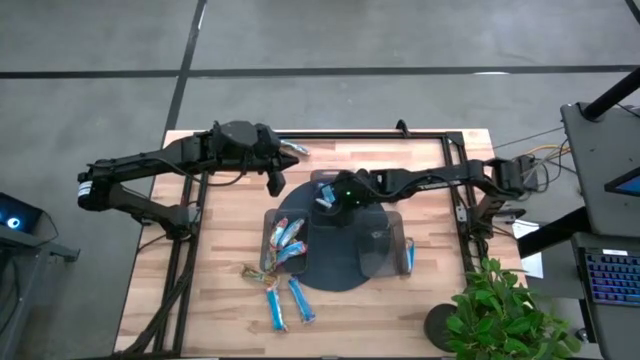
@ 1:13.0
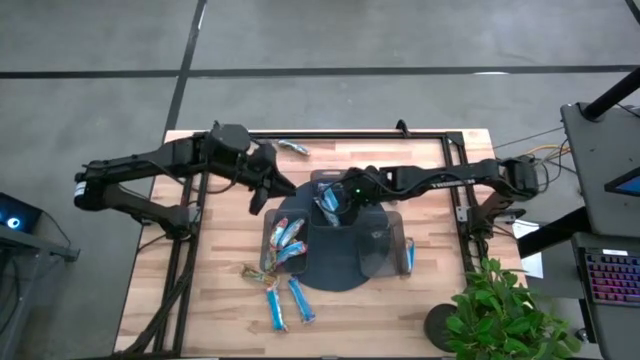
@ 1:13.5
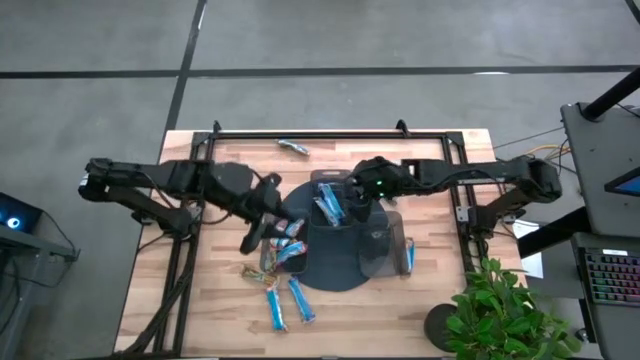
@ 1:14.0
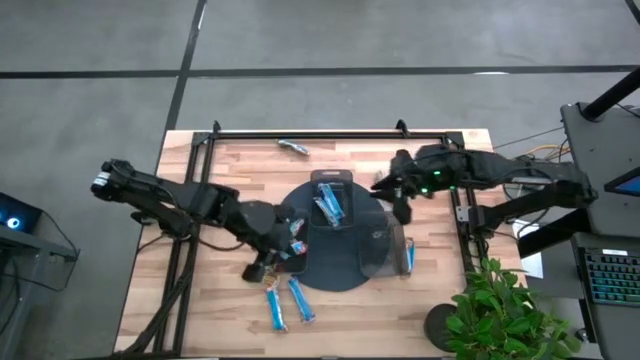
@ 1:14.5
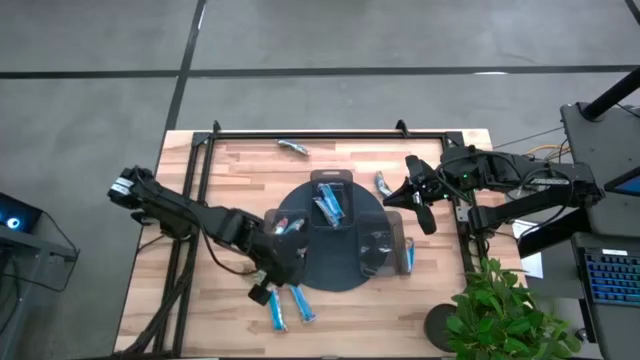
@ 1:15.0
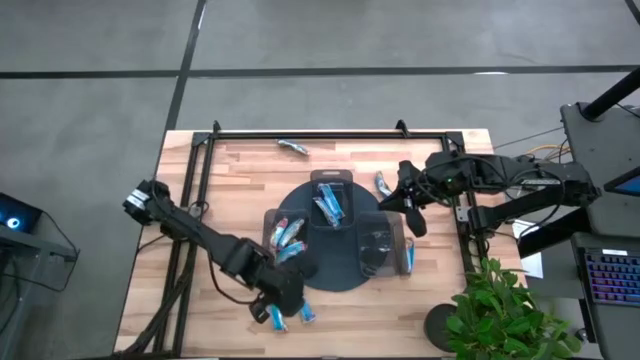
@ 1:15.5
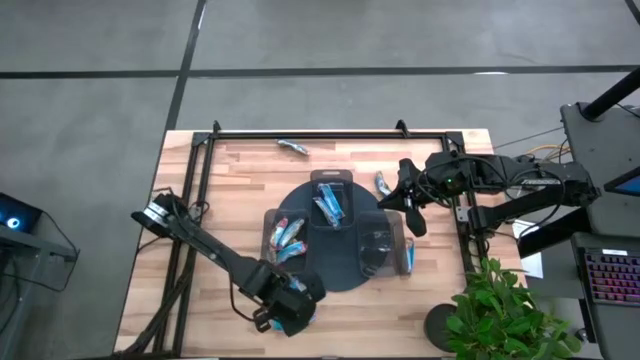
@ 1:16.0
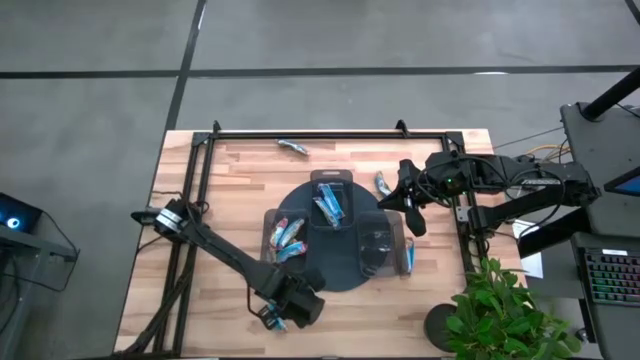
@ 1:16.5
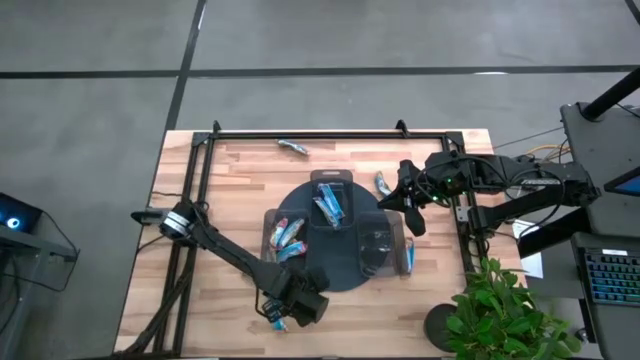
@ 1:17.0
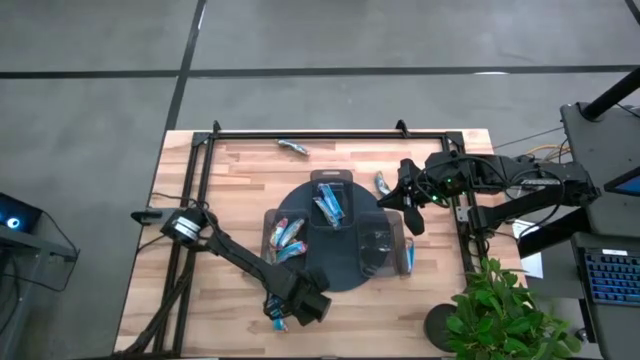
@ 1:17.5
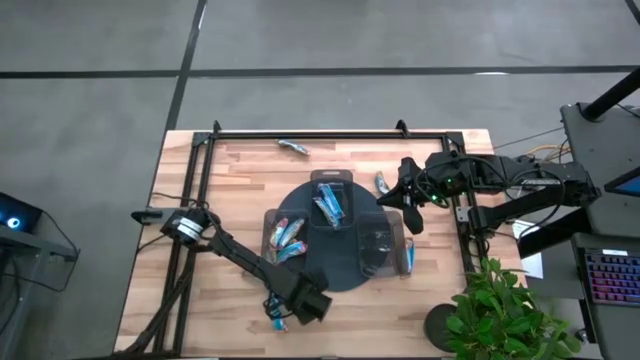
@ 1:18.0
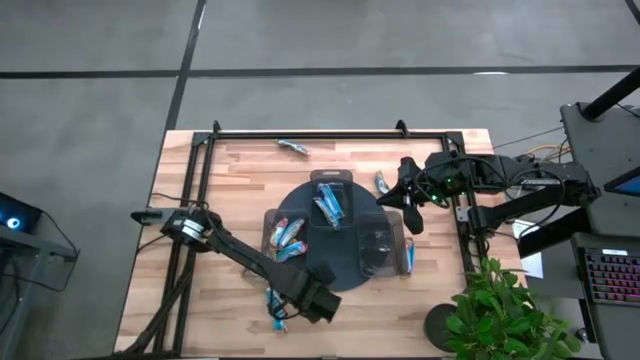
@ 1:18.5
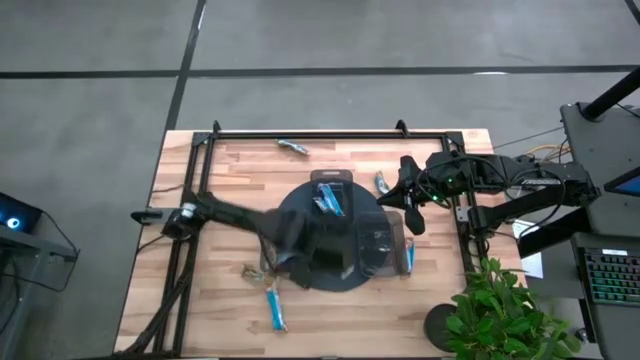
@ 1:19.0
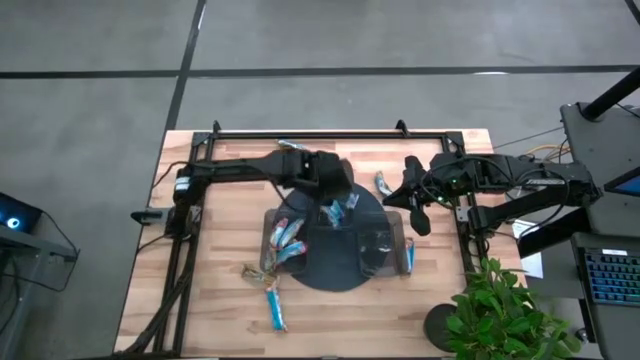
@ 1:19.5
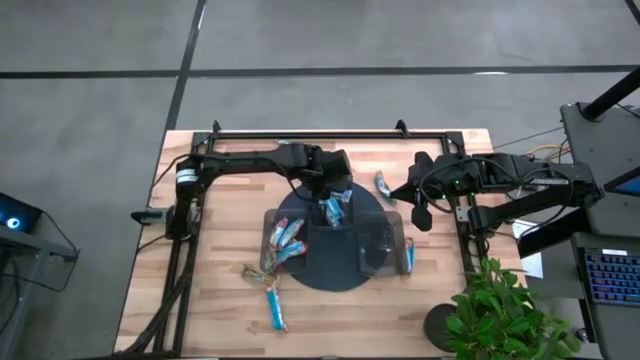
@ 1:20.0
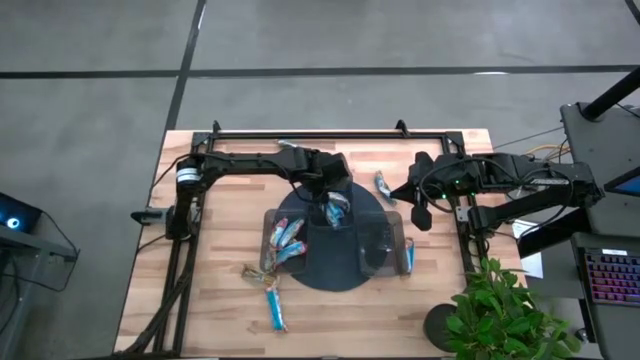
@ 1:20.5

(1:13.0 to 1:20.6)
Task: Pick and place Granola Bars by type
Put the blue granola bar into the top black bin

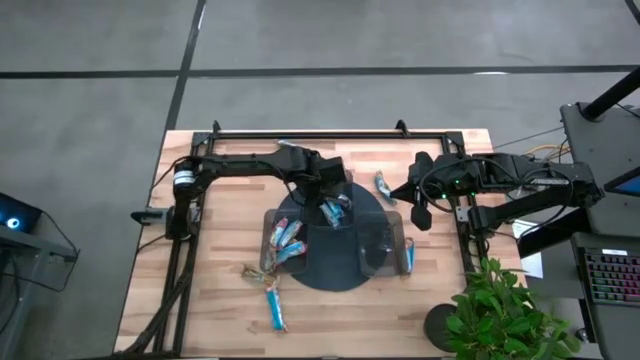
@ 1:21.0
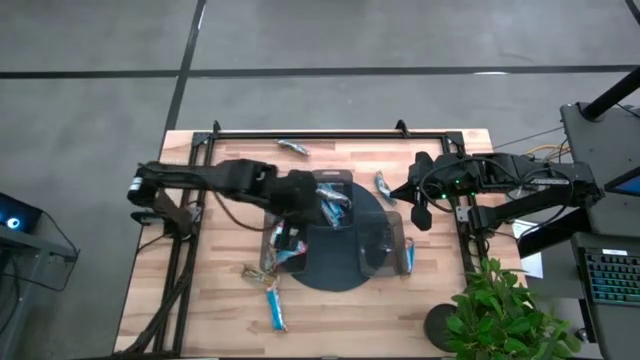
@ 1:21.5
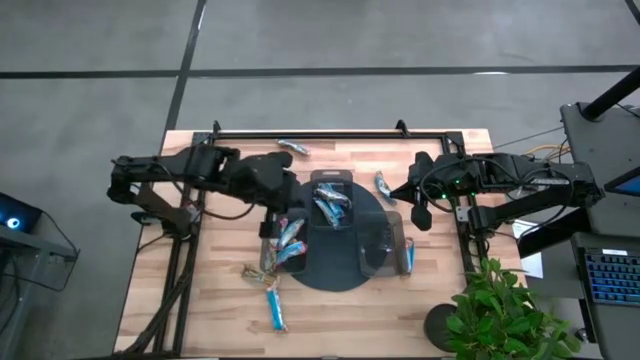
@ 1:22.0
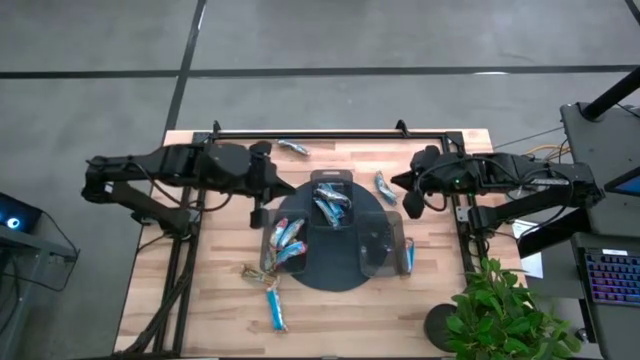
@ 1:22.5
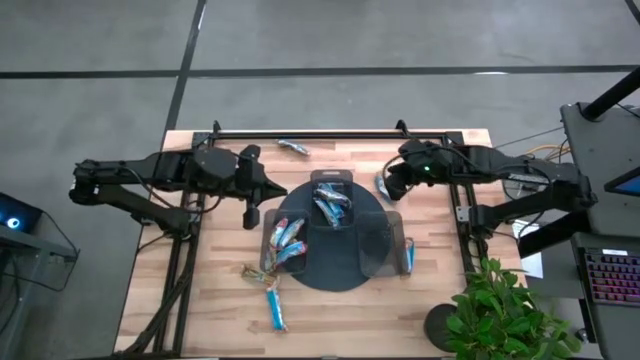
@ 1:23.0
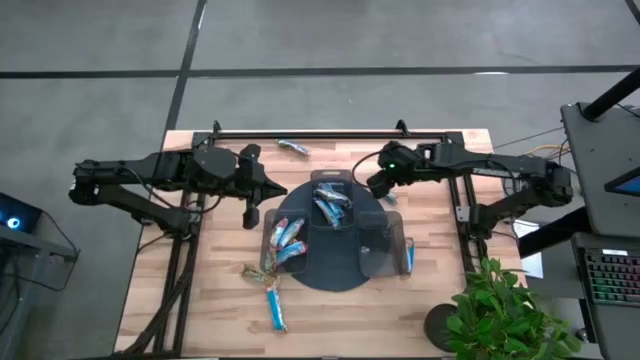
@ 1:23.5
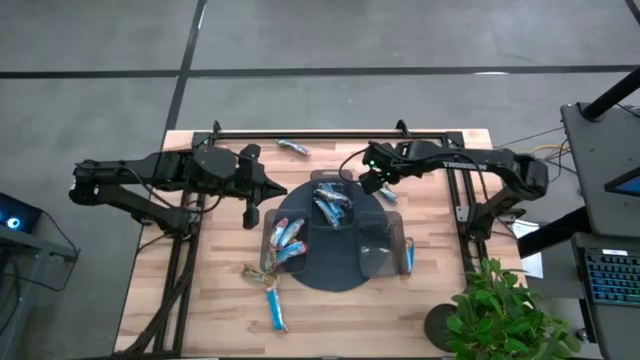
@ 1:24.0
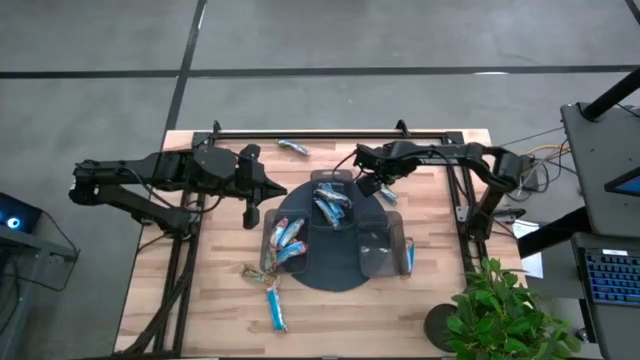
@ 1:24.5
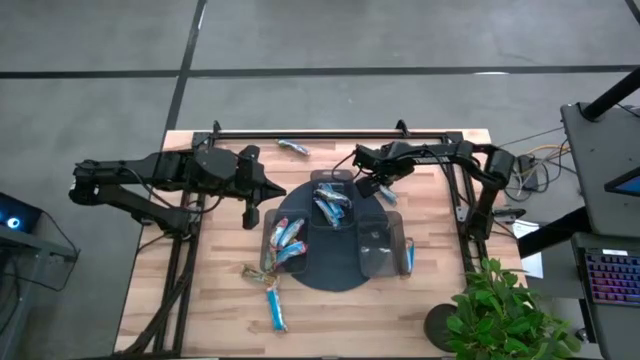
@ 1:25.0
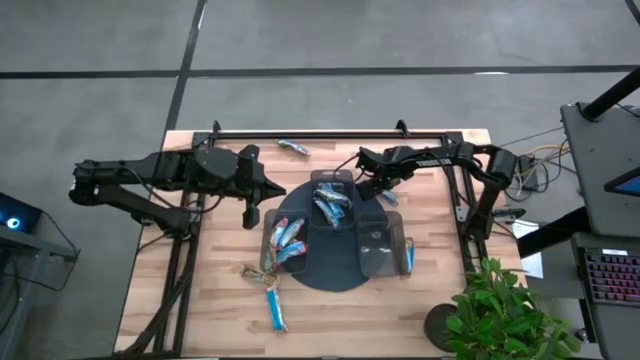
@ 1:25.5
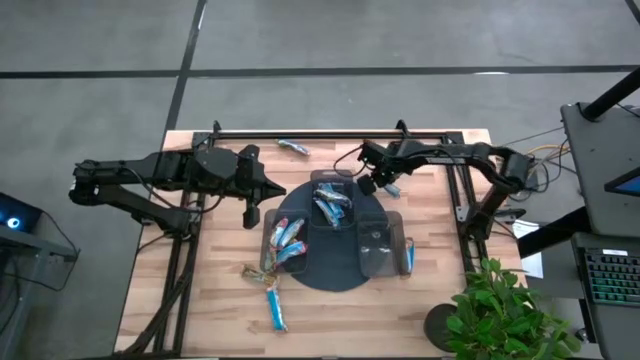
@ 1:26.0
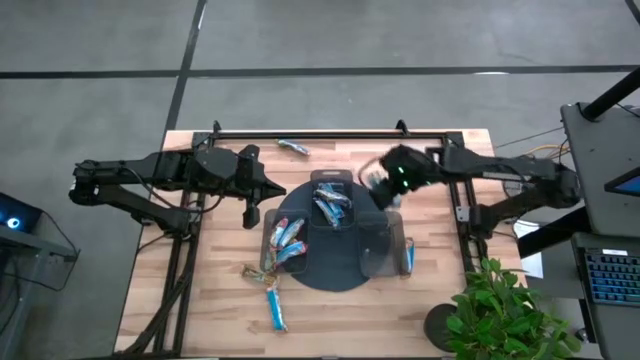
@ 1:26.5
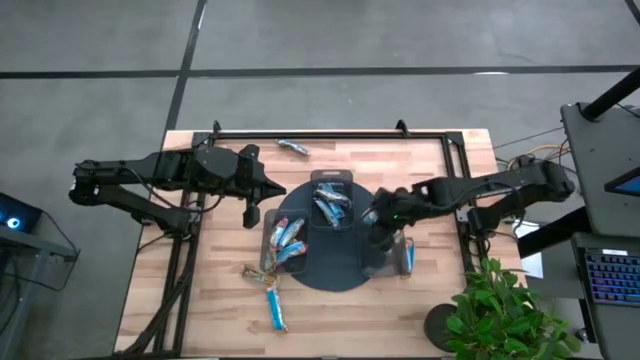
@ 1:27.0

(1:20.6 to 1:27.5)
Put the yellow granola bar into the bottom right black bin

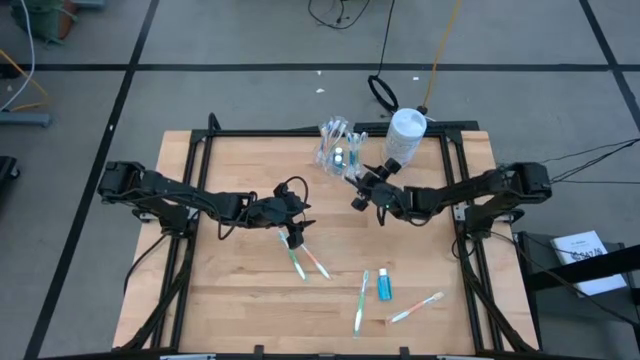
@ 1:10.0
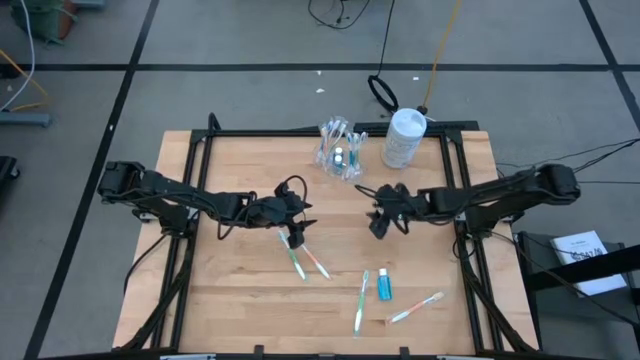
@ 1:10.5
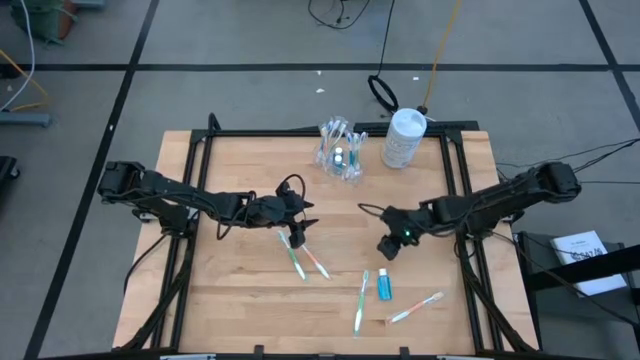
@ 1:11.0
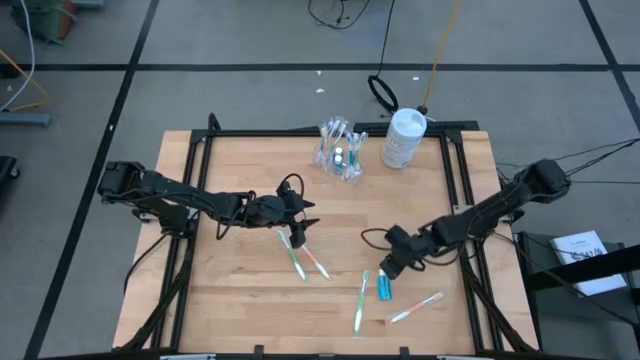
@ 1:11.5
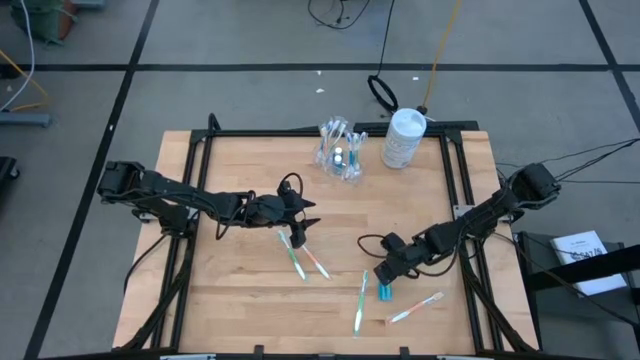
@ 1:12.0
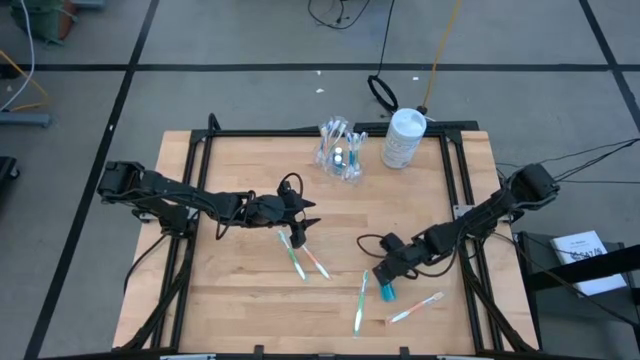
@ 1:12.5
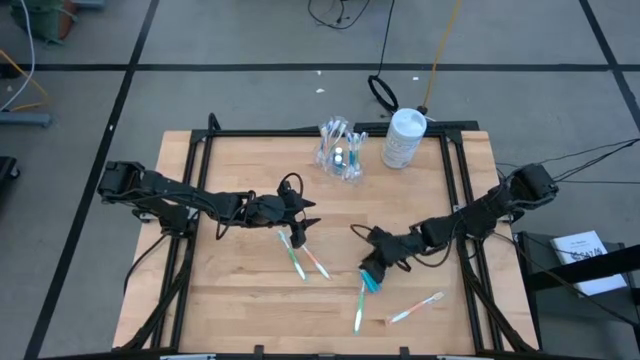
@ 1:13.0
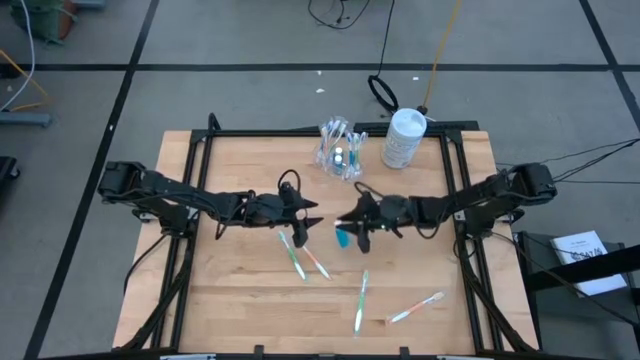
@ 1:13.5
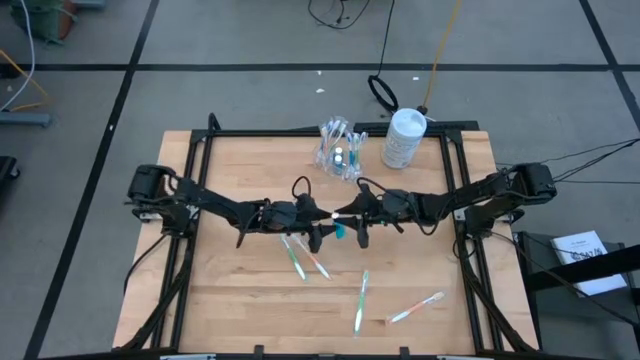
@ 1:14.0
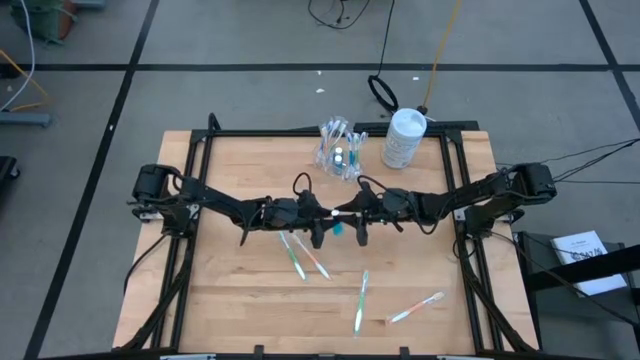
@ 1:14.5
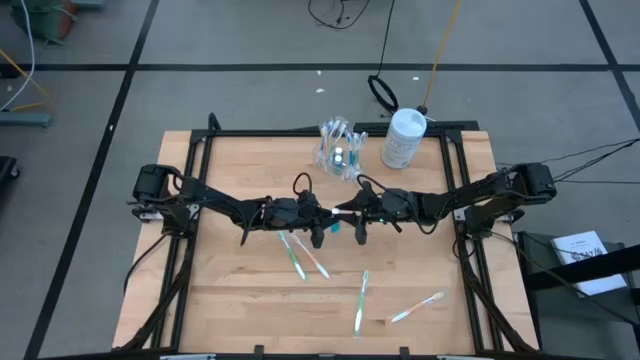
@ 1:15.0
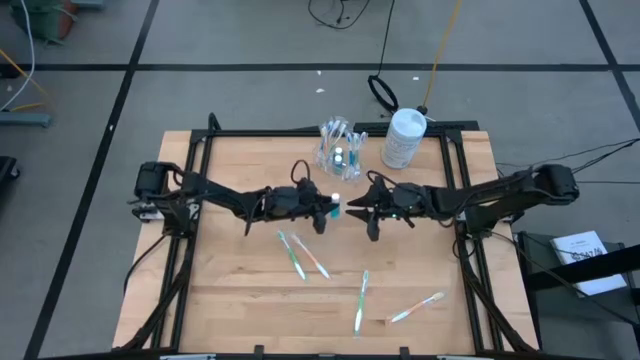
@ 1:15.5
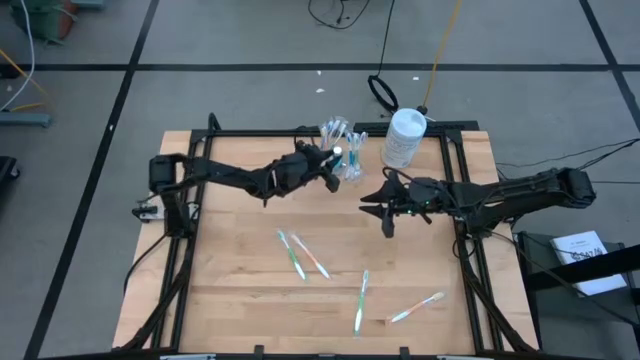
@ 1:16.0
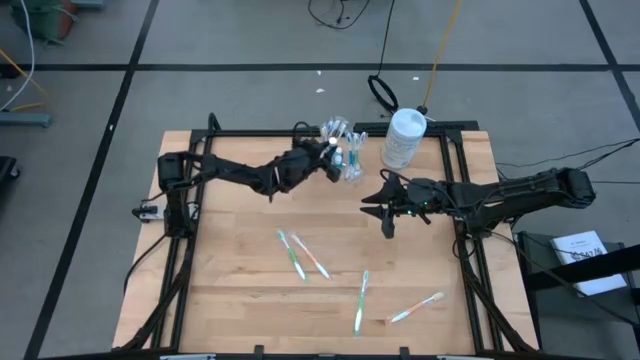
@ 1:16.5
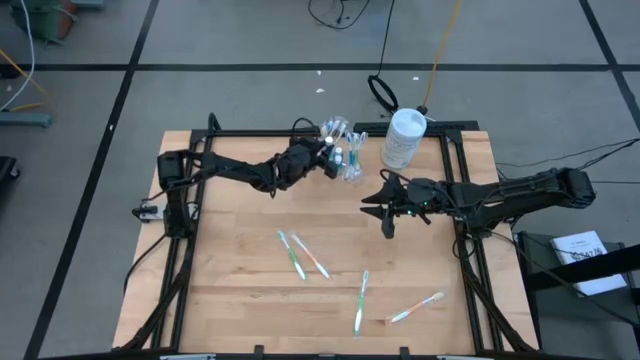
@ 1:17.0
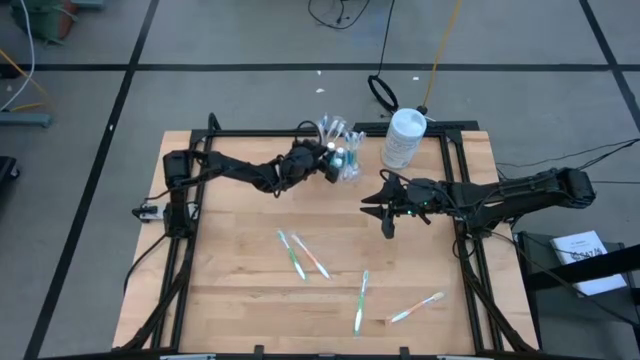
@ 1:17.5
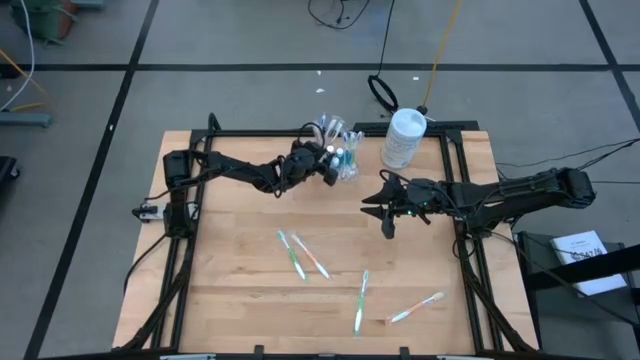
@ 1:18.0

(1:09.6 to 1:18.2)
Task: Pick & Place toothbrushing station
Put the blue mouthwash into the transparent organizer
